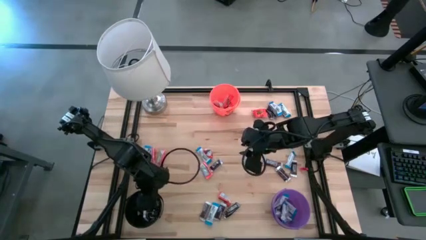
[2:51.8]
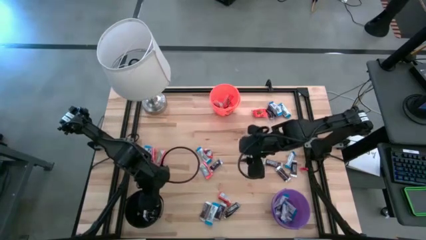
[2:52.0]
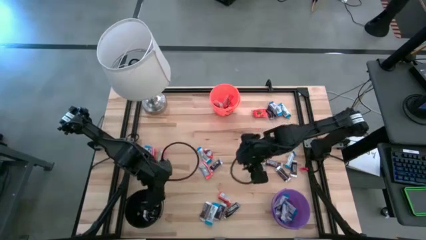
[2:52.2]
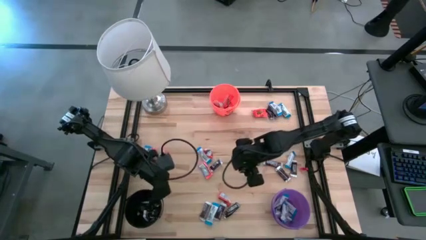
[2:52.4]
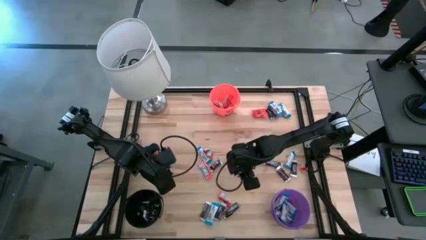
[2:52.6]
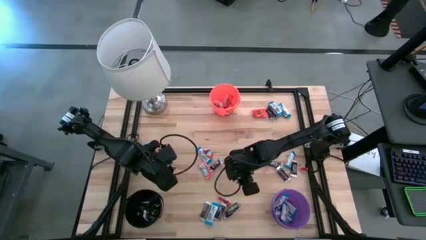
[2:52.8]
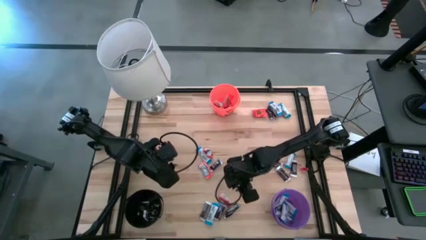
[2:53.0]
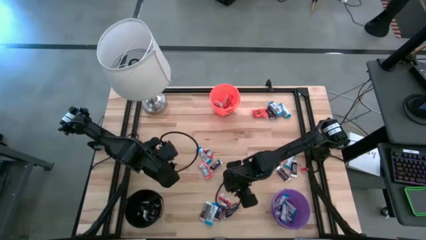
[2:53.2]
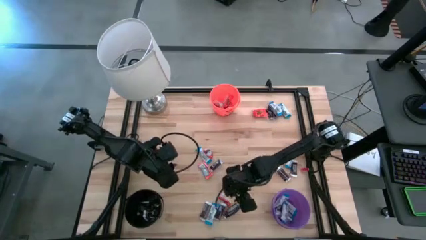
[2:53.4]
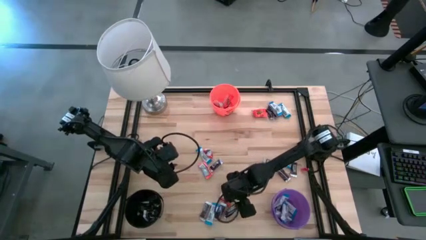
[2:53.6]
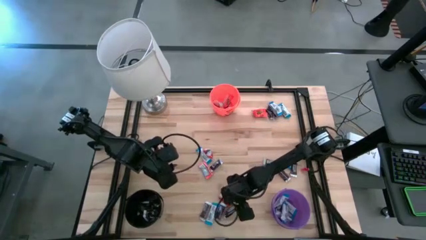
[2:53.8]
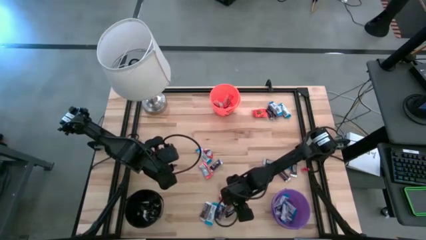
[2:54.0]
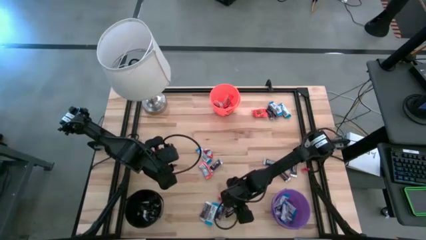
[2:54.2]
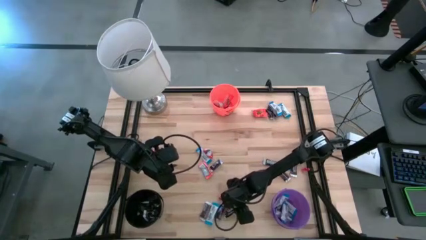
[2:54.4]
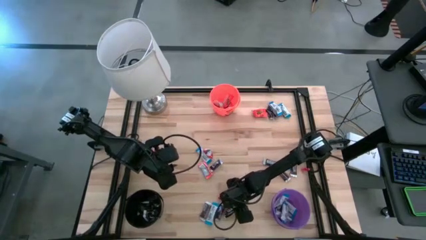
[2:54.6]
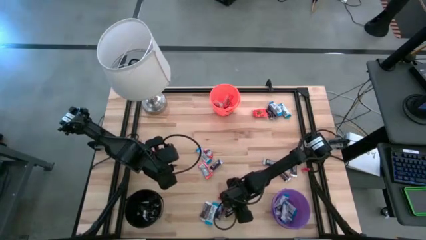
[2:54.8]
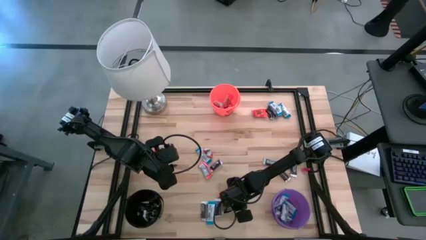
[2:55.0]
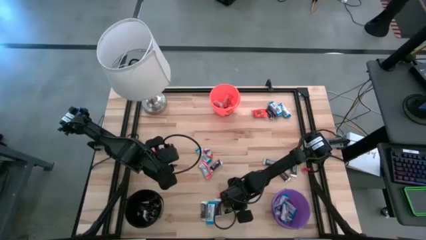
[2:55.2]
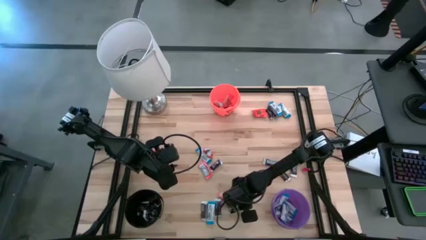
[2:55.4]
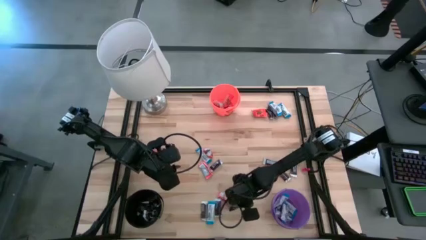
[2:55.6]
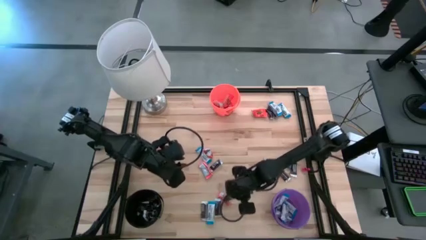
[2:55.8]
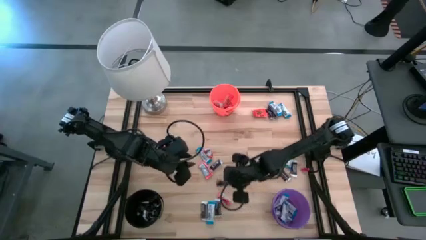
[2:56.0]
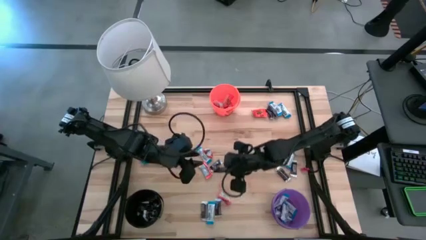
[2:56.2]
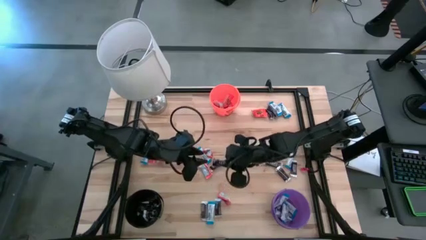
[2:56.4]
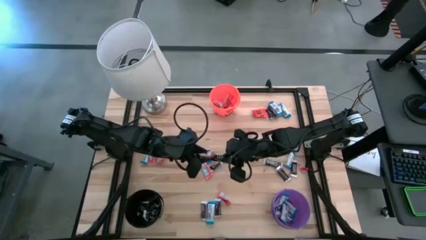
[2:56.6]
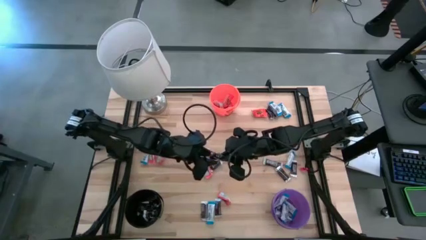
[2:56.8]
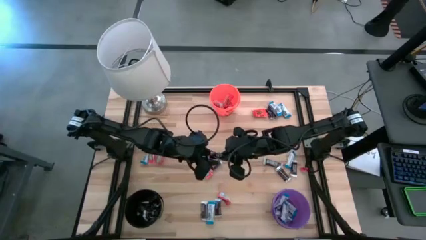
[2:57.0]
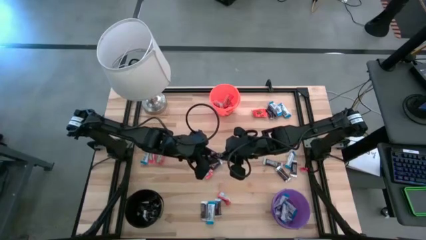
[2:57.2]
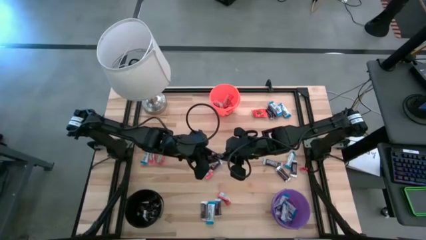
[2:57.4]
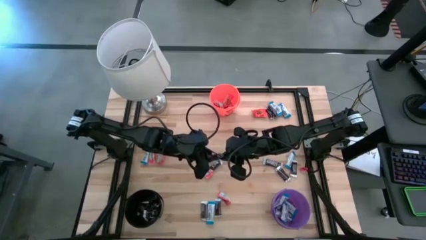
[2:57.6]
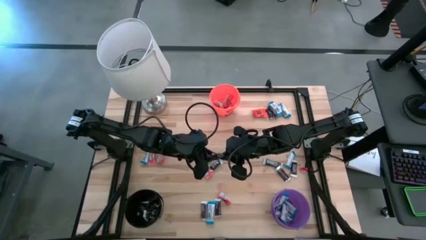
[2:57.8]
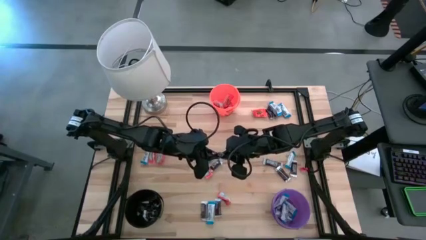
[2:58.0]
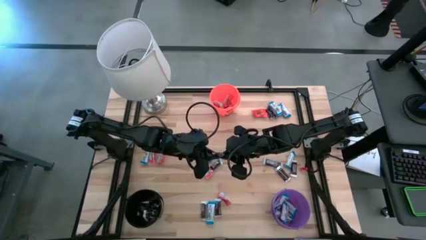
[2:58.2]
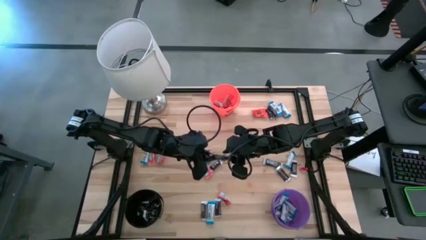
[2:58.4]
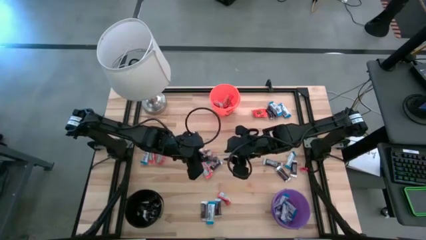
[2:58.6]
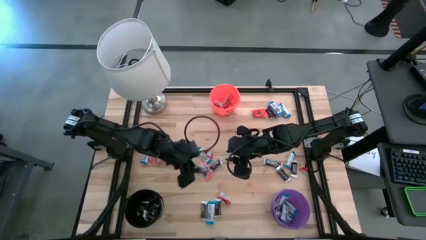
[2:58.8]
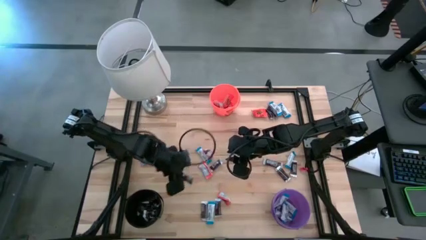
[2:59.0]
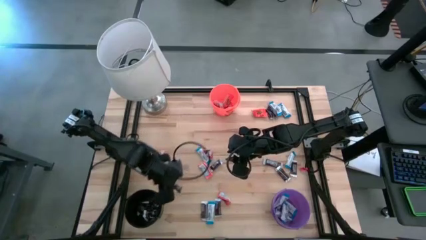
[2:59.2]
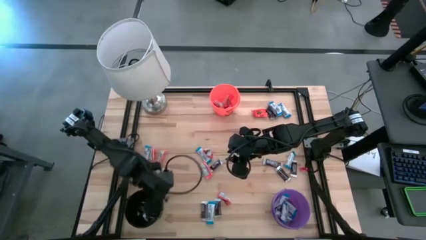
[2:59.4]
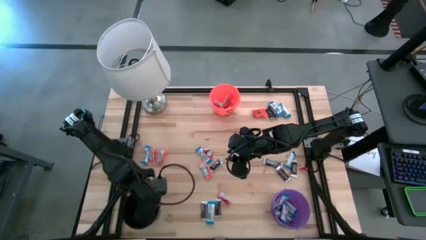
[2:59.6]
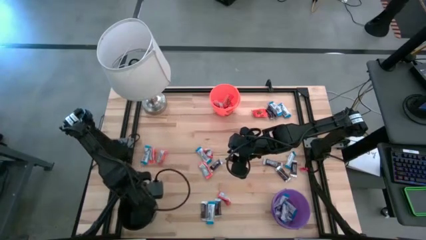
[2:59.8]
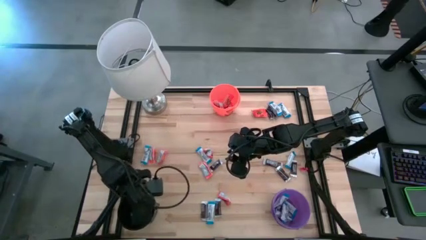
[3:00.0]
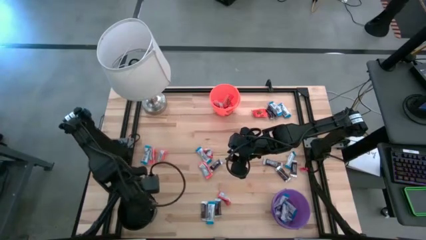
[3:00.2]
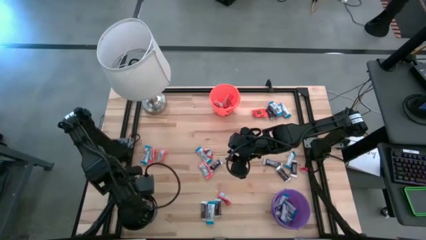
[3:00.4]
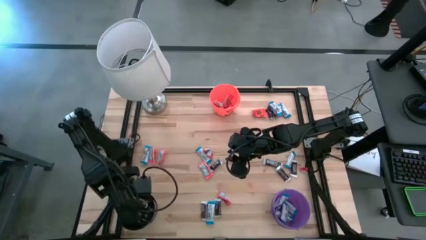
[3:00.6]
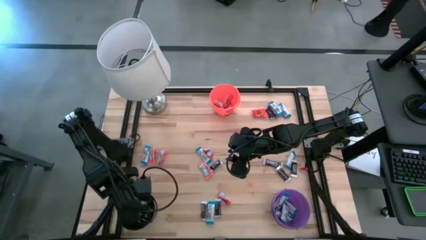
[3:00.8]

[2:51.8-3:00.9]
Task: Organize candy in baskets
Put the brown chocolate into the black bucket

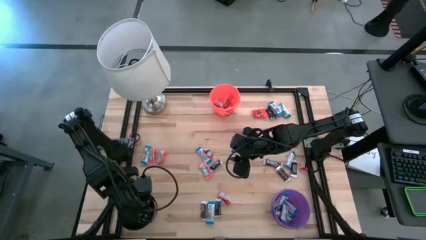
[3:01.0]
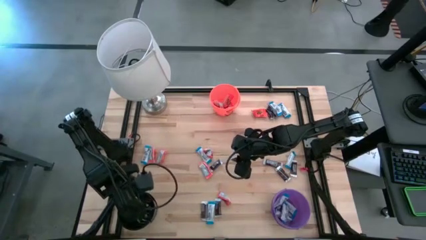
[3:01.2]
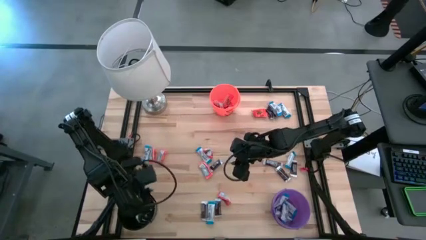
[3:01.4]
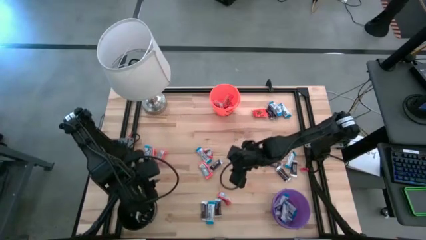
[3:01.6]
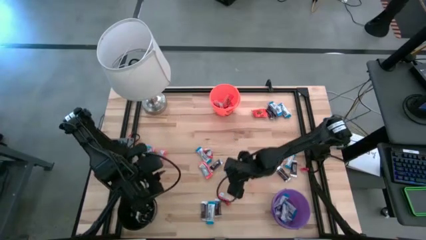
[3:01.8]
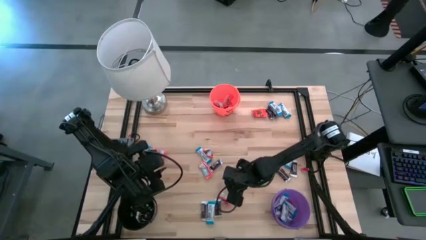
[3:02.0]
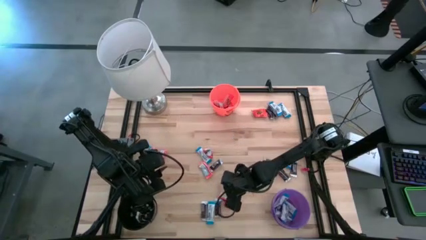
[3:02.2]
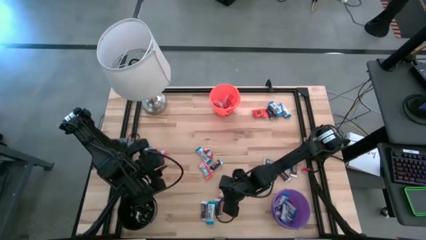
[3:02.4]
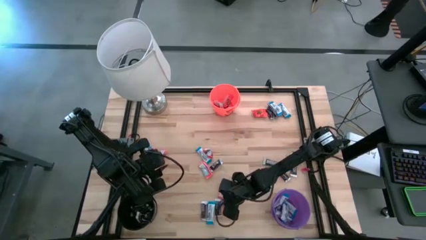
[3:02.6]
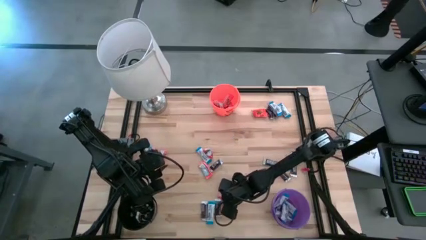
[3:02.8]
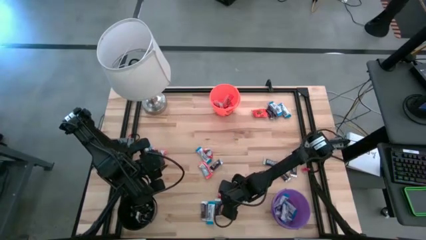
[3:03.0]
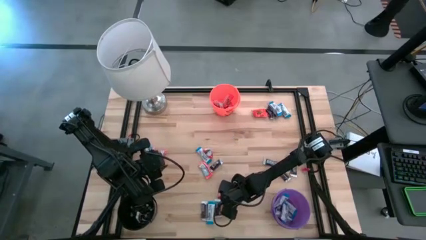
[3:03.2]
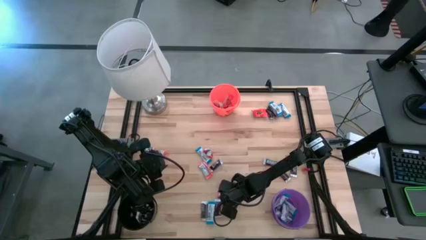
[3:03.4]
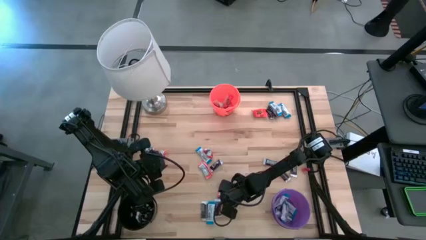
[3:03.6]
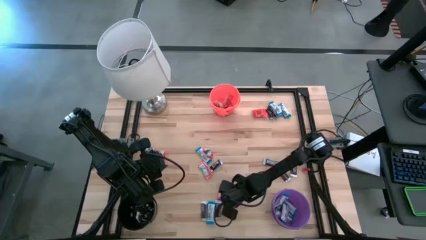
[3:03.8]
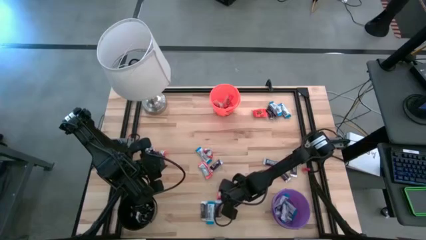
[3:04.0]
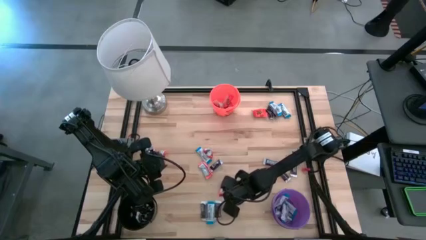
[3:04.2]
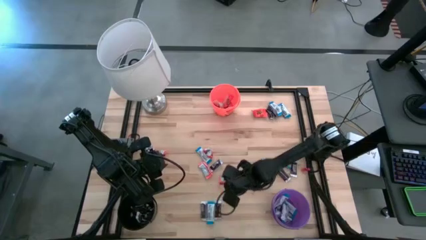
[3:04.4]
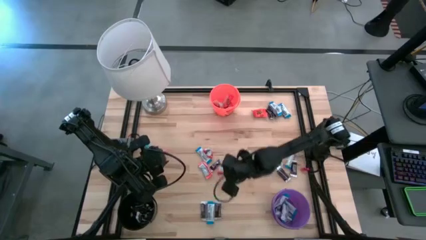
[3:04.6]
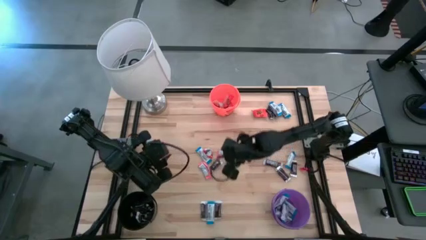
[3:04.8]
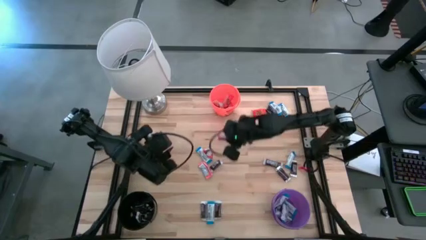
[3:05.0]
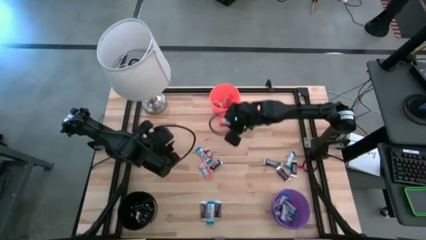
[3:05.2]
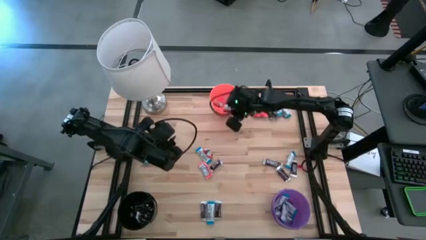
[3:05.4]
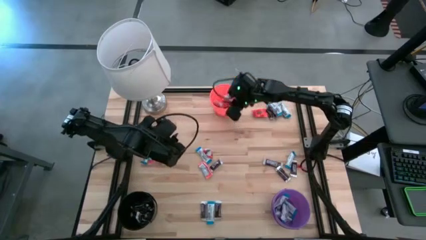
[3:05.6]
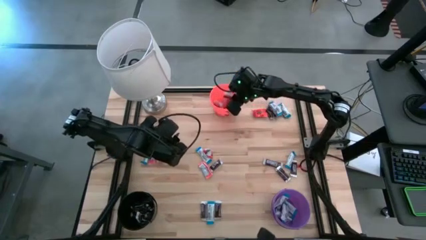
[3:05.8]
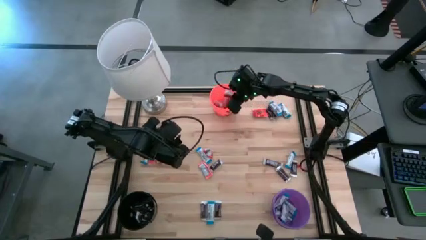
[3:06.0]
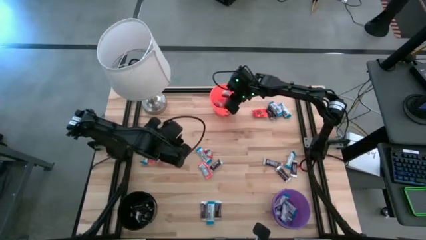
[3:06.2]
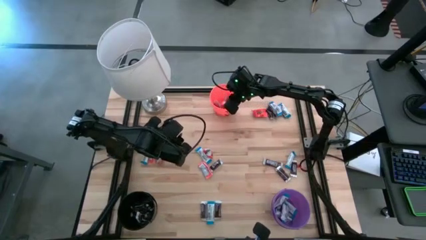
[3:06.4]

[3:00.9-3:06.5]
Put the orange chocolate into the orange bucket
